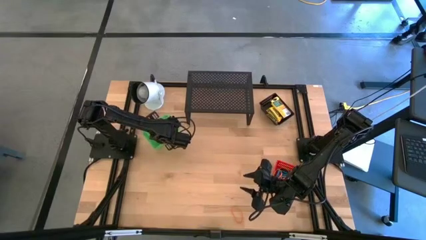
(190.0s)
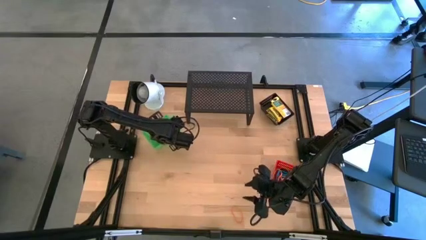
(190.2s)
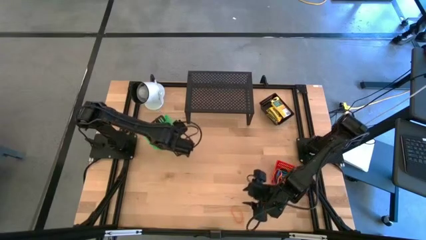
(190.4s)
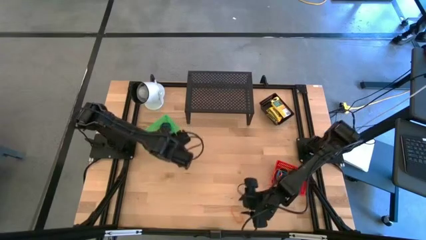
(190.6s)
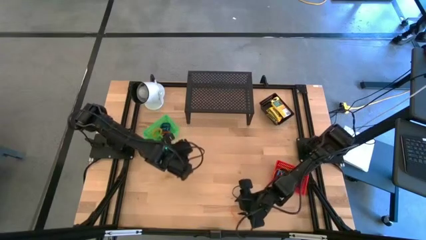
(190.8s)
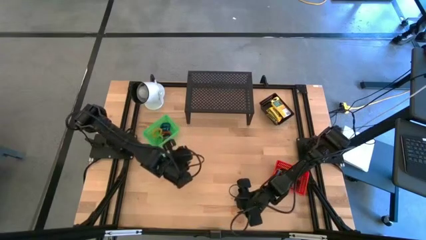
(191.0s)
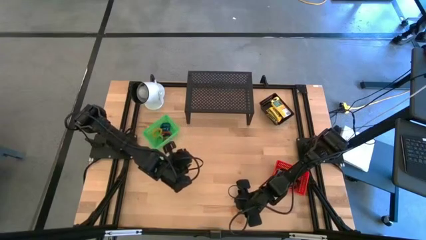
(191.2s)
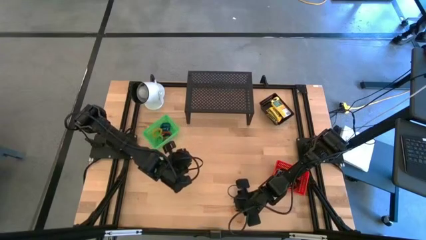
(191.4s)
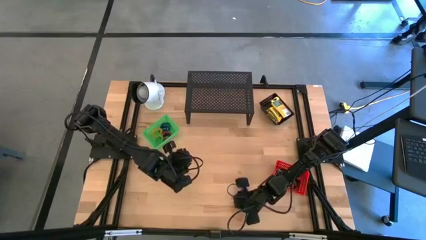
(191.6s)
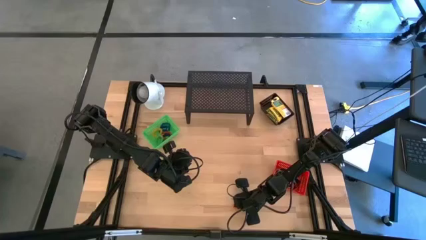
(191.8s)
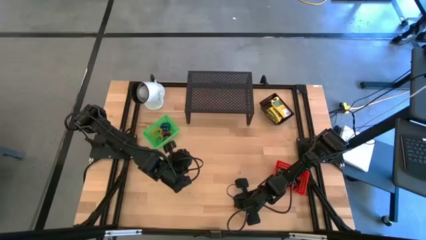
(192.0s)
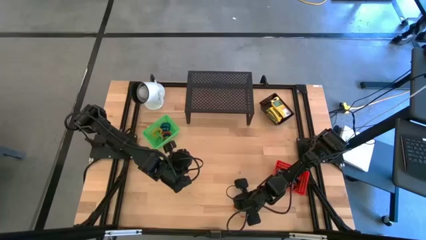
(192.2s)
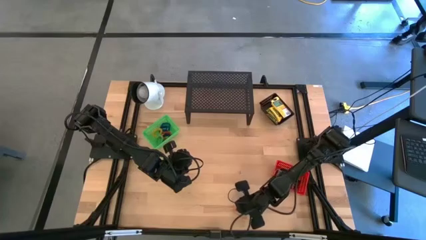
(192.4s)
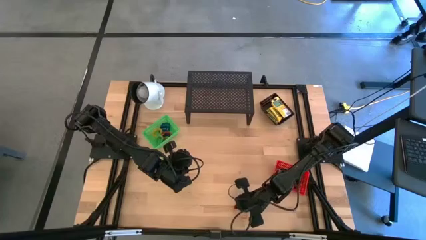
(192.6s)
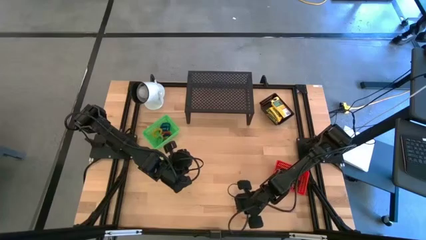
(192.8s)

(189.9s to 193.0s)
Task: Pick & Place Office Desk Supplies
Put the orange rubber band into the red bin

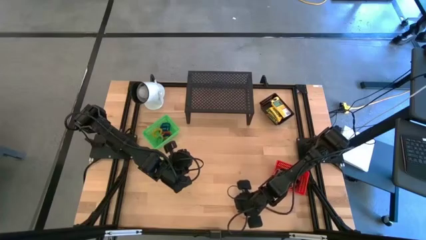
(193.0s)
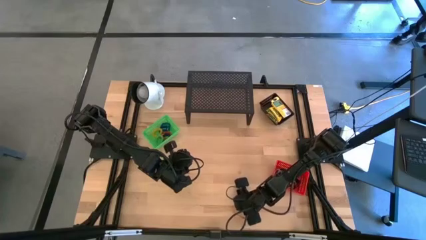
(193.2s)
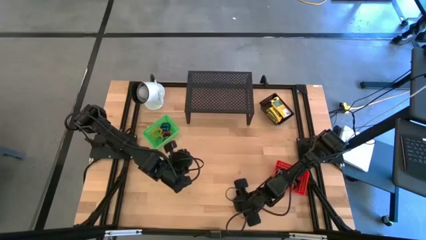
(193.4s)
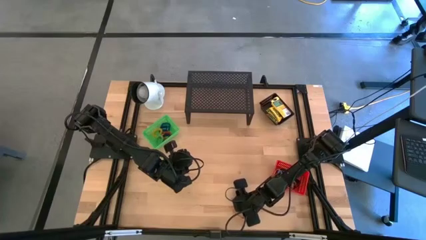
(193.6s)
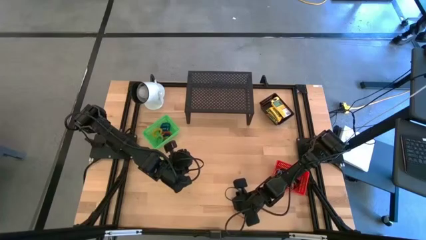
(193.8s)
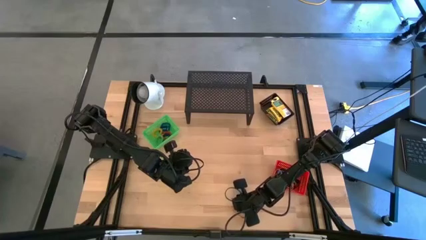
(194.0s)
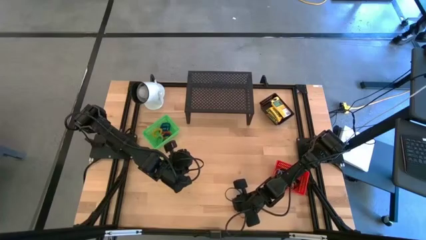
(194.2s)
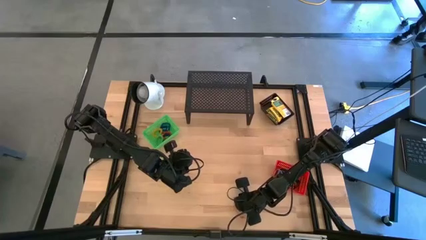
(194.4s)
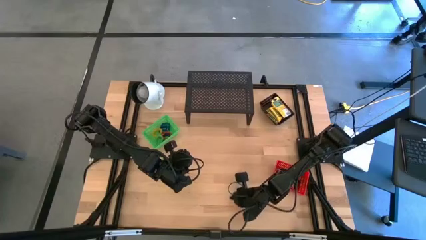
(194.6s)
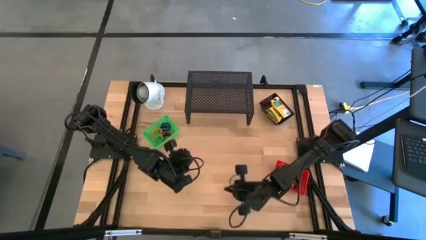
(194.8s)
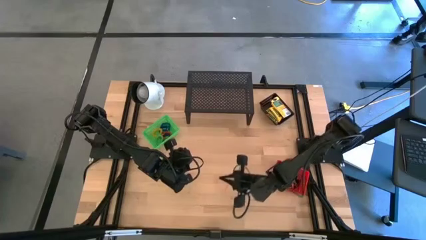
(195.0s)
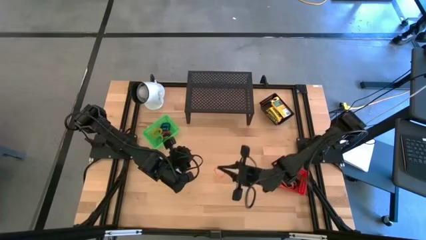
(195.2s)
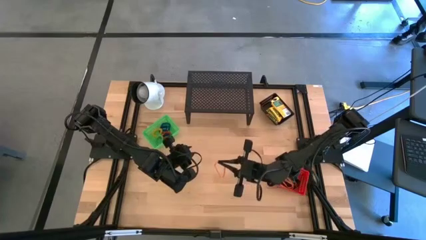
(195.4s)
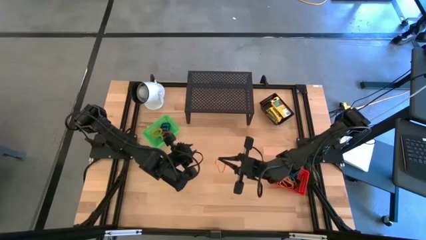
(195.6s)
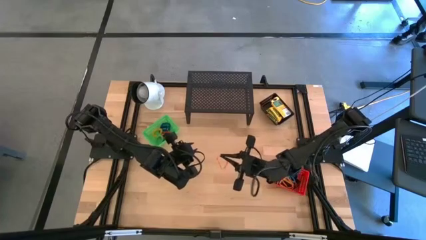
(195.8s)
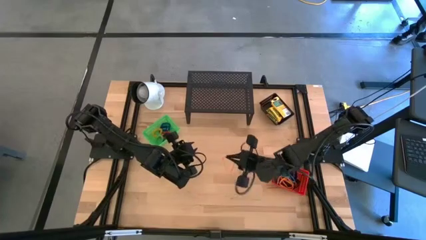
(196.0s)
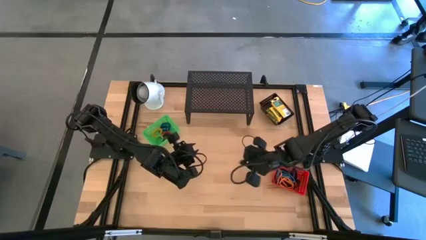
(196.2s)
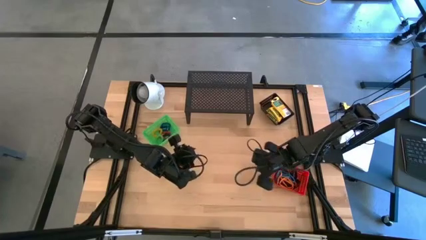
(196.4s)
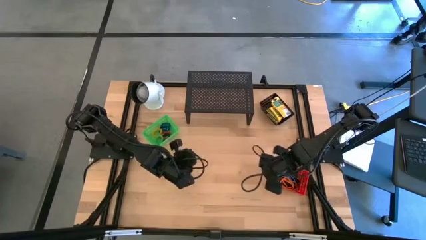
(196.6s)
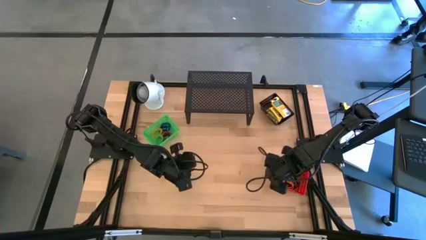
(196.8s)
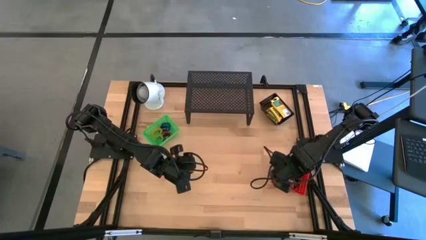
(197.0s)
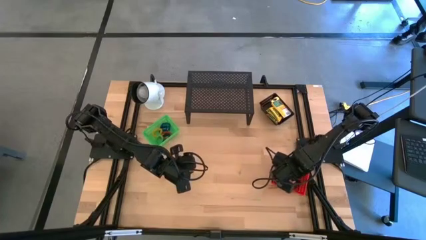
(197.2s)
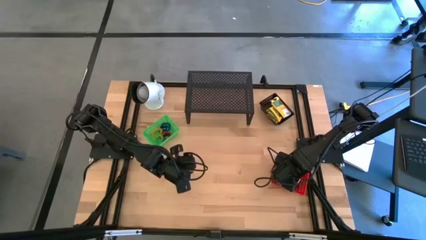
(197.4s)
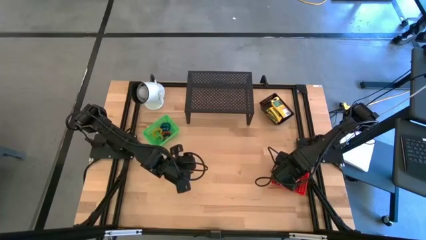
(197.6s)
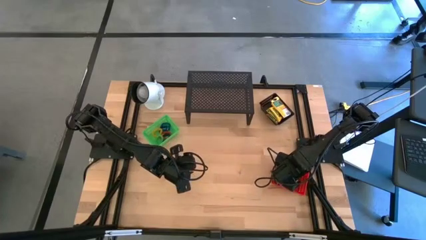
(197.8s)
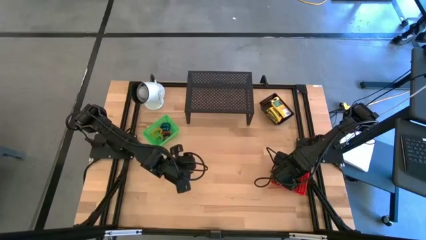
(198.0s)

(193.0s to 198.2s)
Put the orange rubber band into the red bin

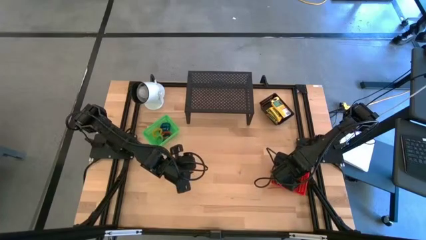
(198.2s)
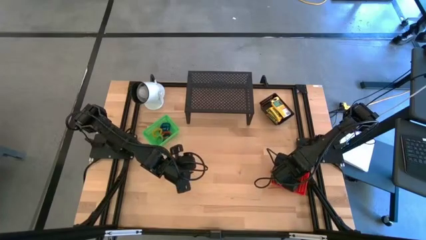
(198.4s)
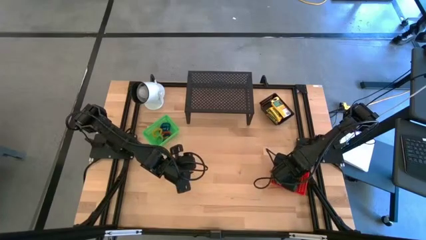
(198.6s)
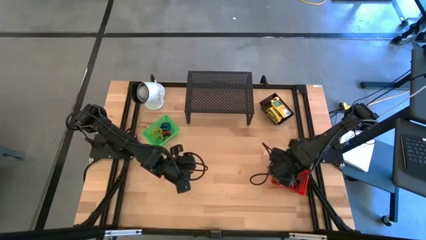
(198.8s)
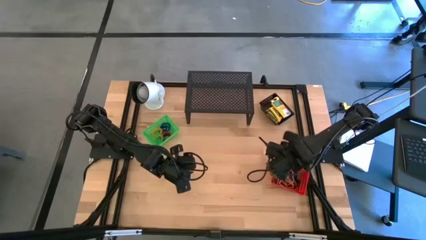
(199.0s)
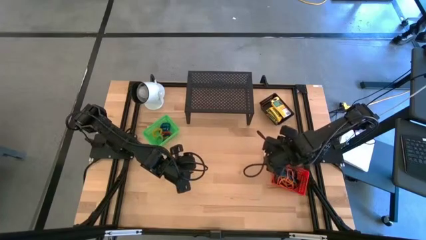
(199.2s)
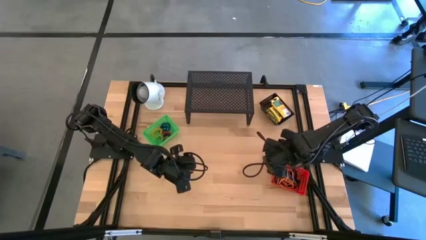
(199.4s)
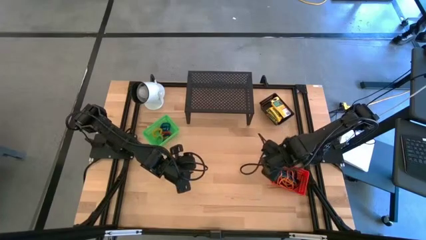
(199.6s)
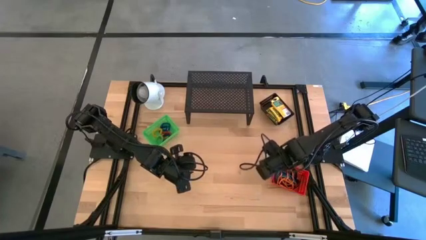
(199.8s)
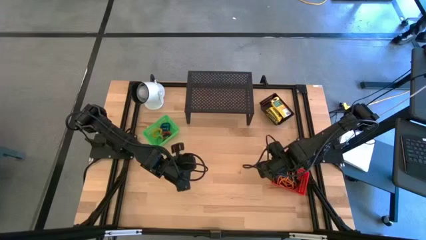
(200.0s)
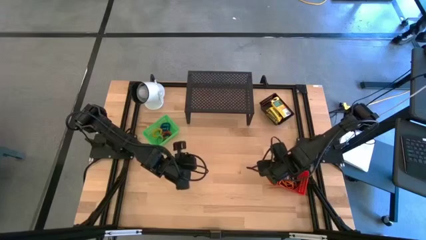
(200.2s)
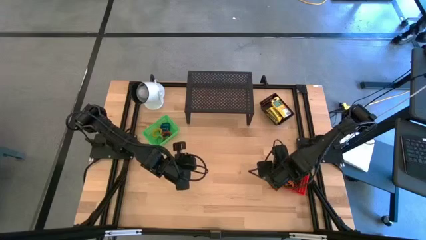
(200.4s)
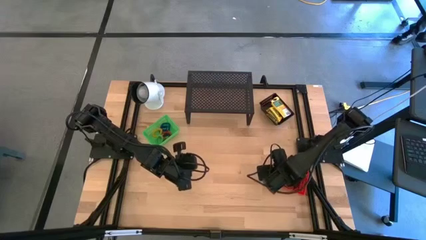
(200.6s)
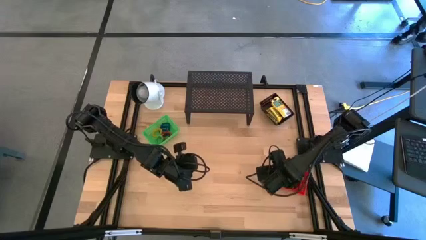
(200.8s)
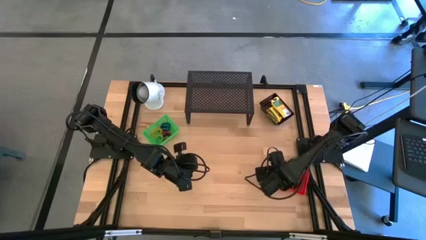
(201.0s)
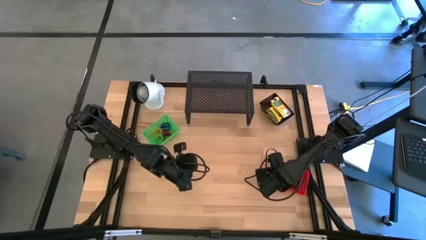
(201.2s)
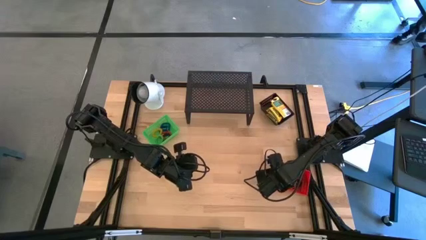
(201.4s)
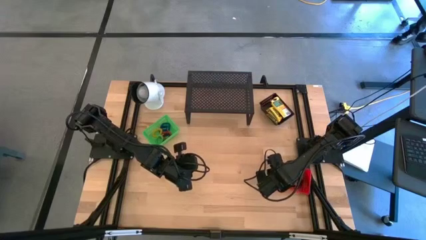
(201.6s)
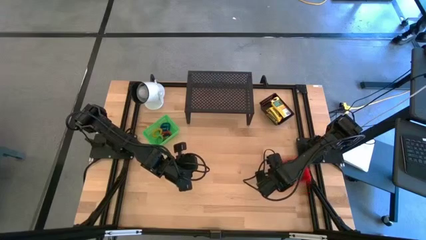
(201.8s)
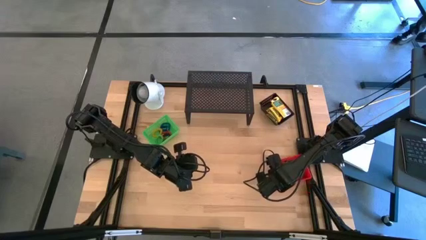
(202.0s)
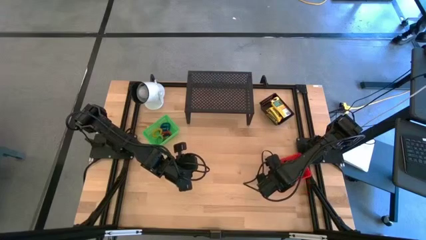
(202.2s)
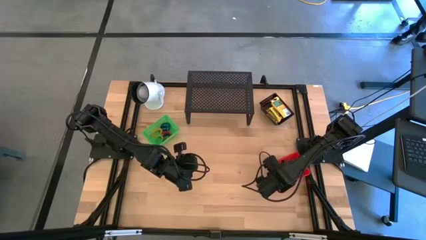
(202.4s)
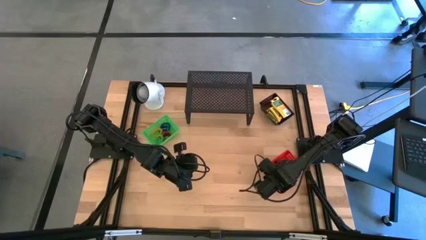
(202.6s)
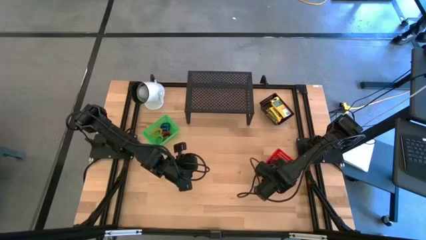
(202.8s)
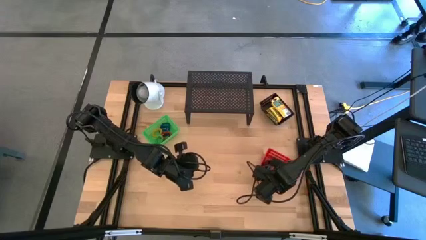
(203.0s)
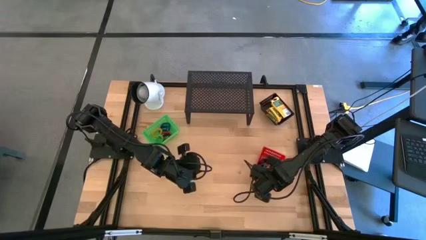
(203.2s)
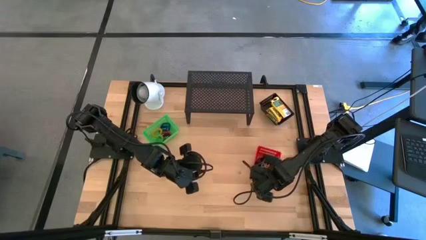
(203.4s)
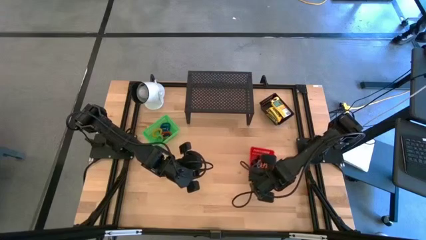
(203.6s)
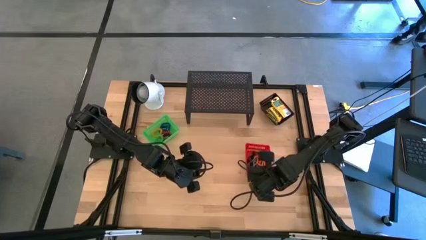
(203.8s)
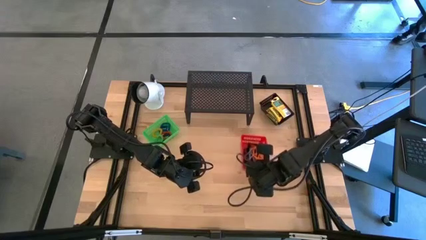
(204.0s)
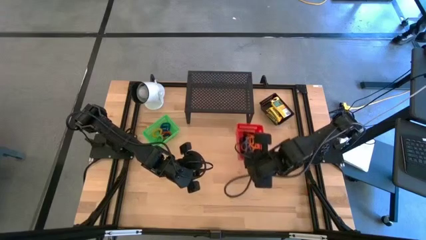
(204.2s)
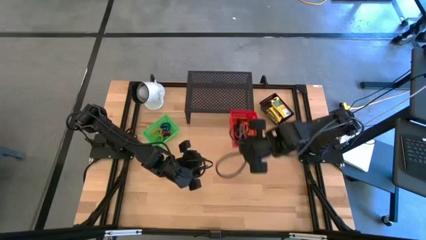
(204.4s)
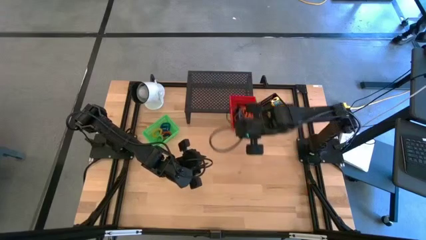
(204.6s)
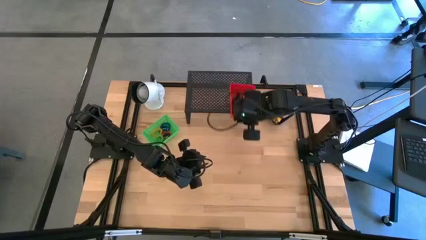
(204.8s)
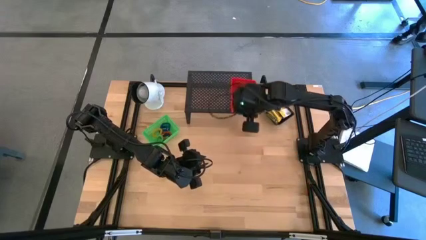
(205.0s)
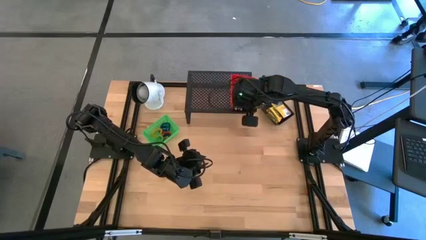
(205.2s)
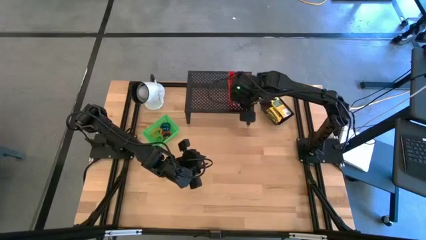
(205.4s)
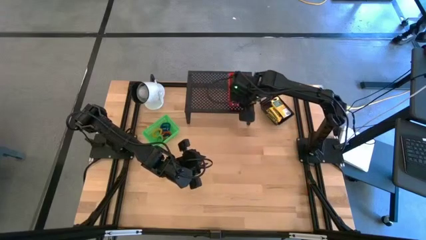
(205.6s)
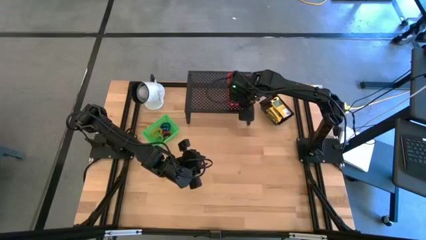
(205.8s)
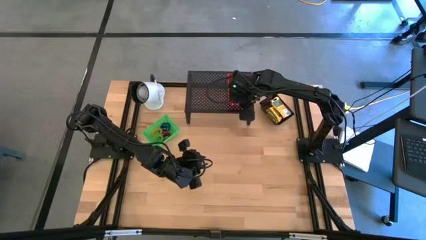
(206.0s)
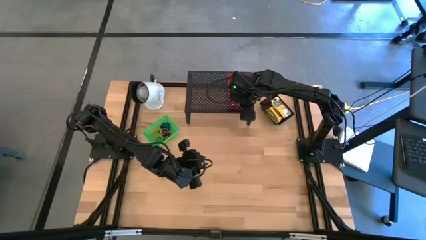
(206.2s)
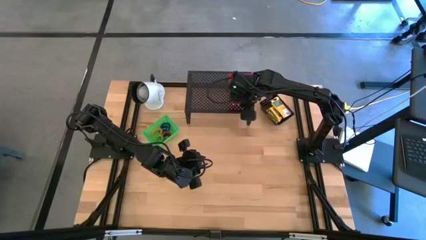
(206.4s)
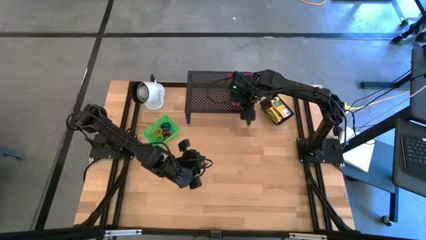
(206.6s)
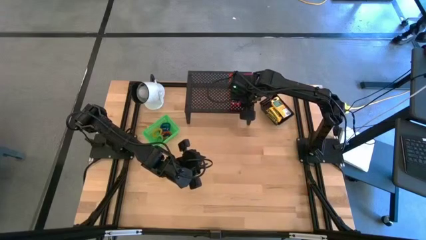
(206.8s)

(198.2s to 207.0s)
Put the red bin on the shelf
